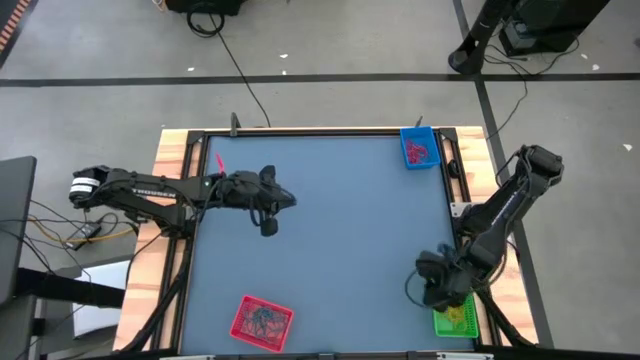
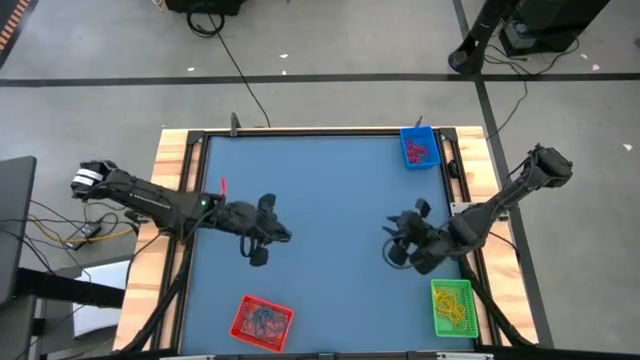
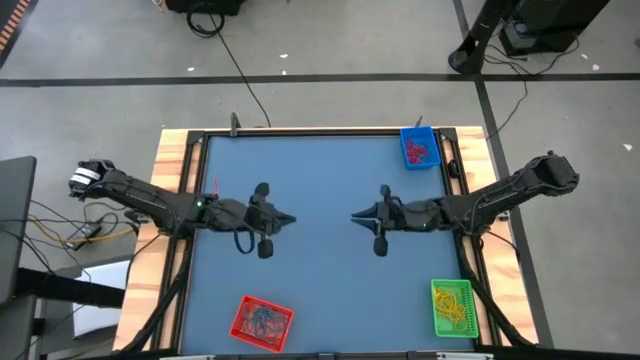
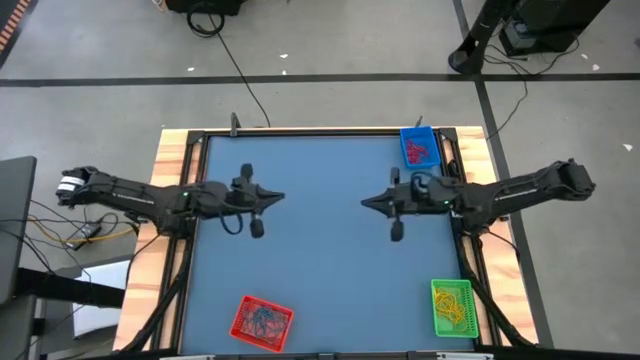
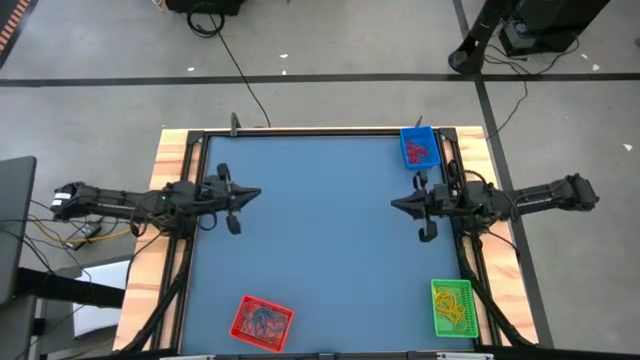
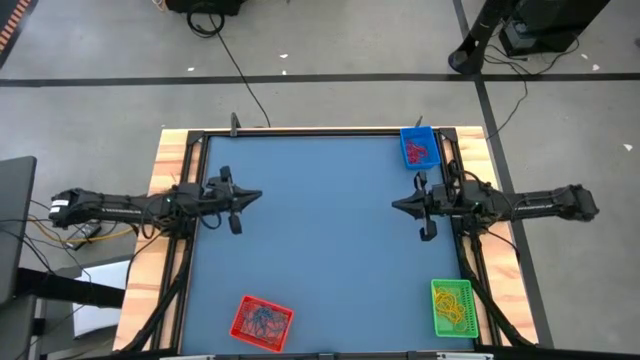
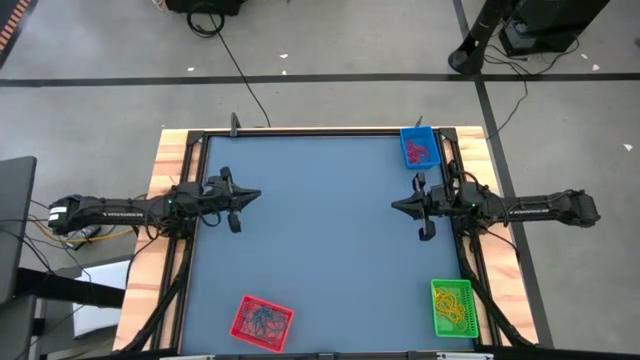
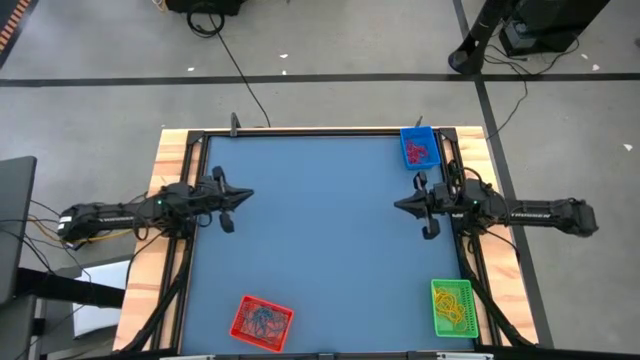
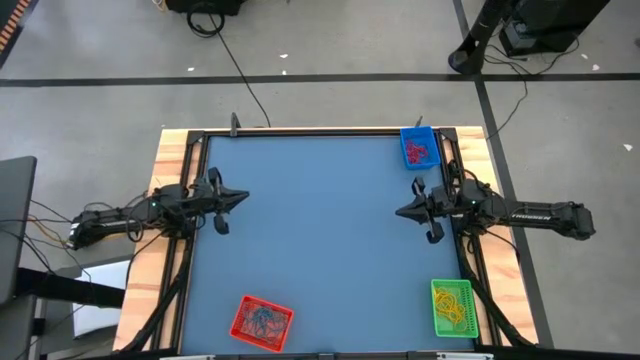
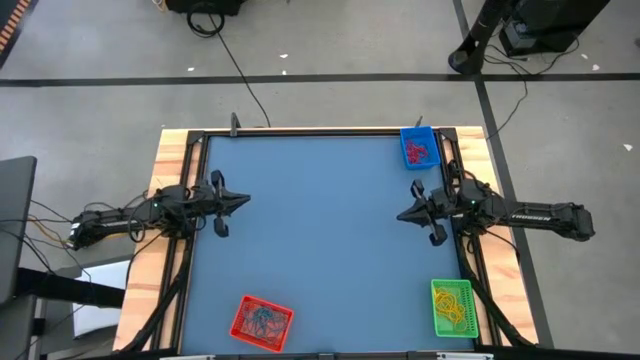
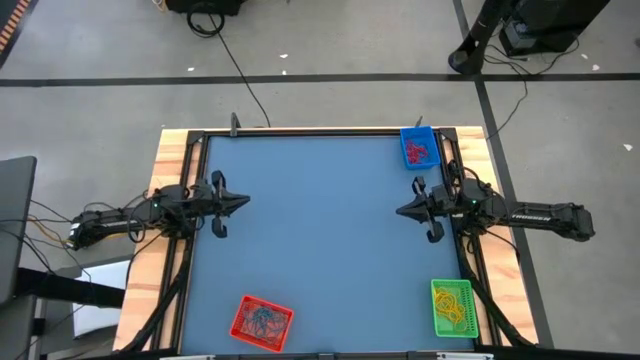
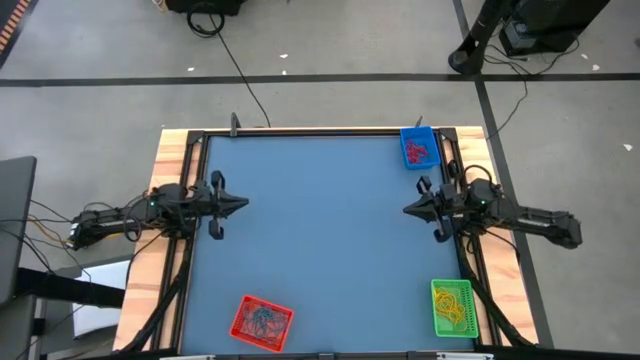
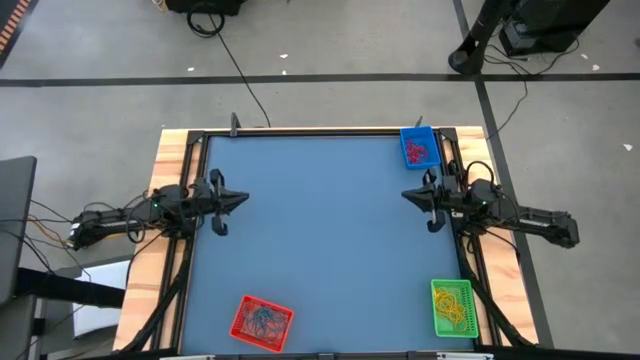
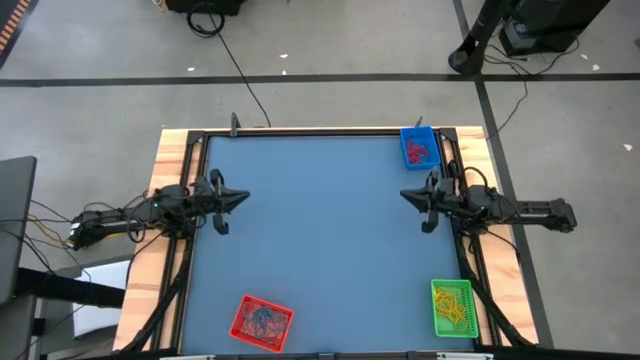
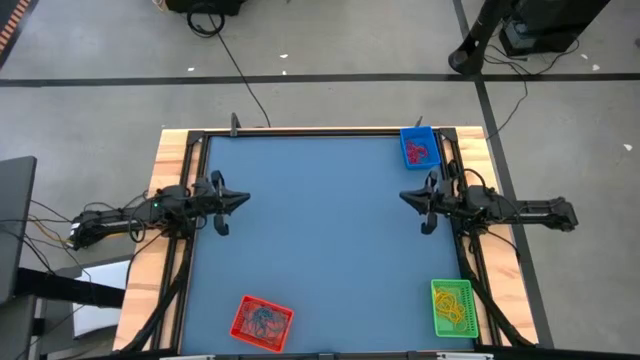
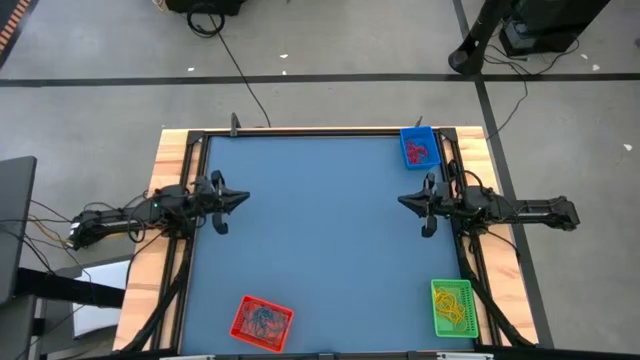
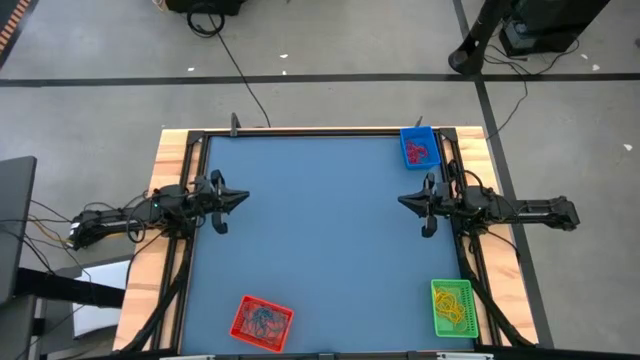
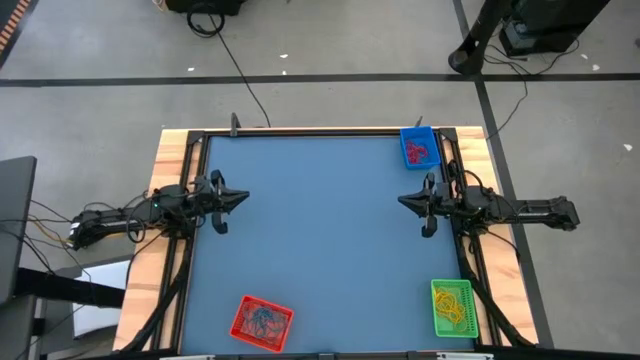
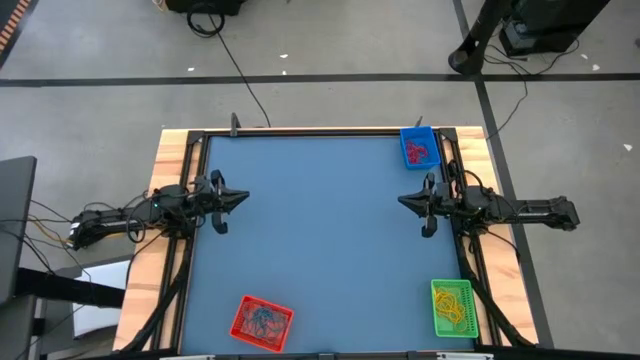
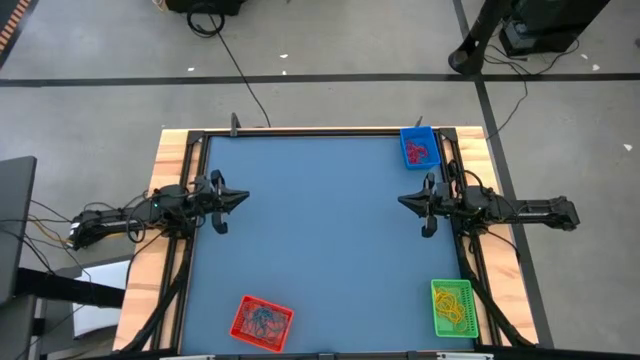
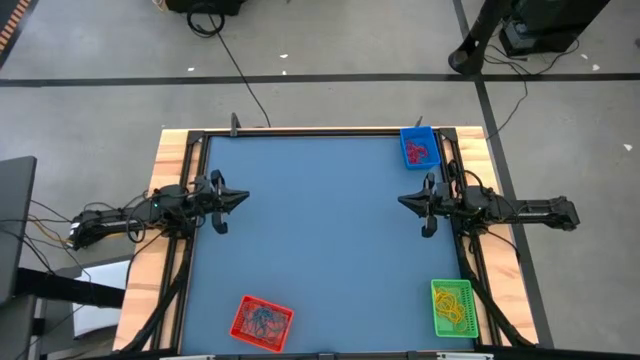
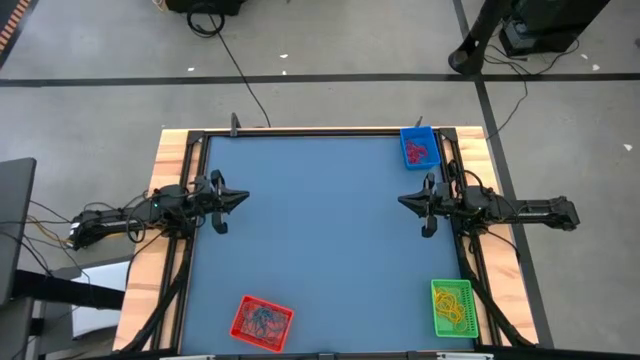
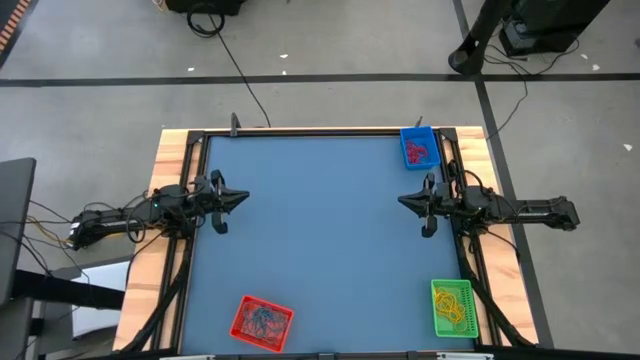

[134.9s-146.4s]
Task: Sort rubber bands into baskets
Return to Home Position

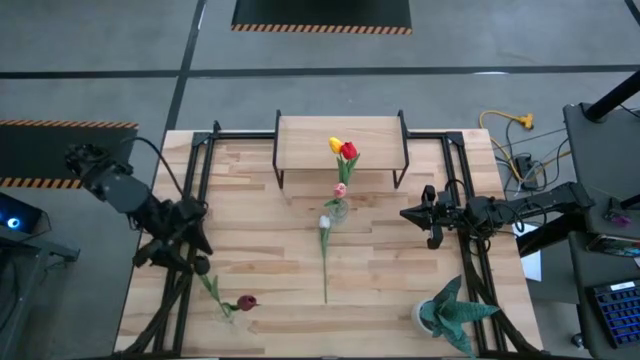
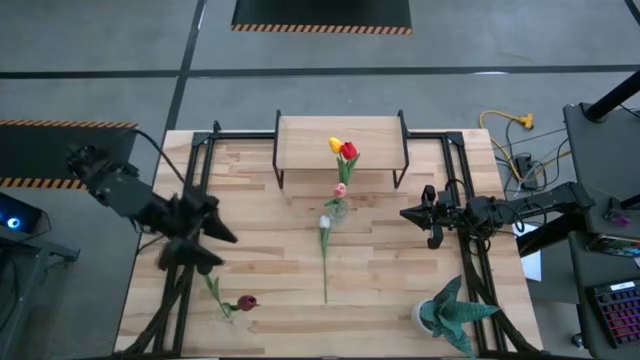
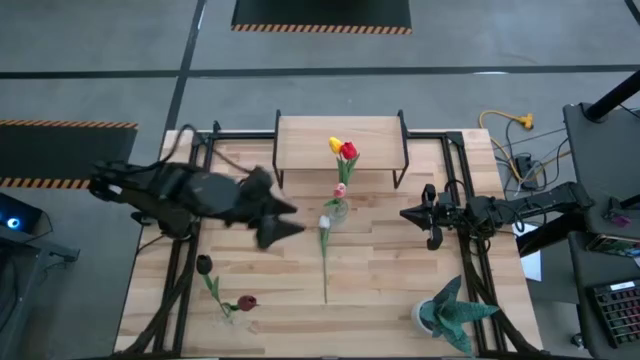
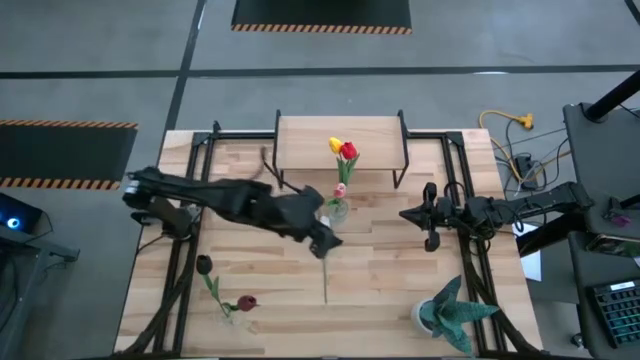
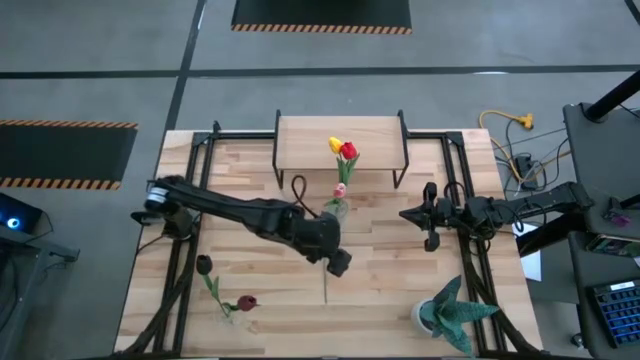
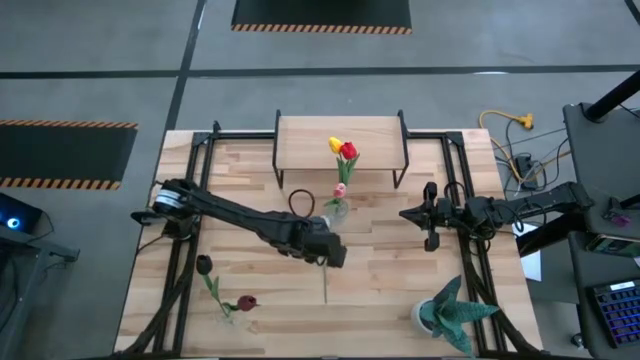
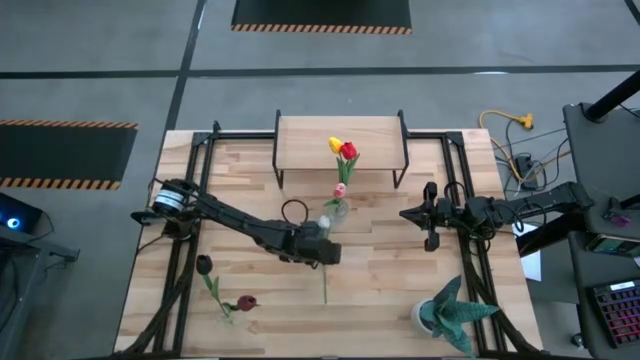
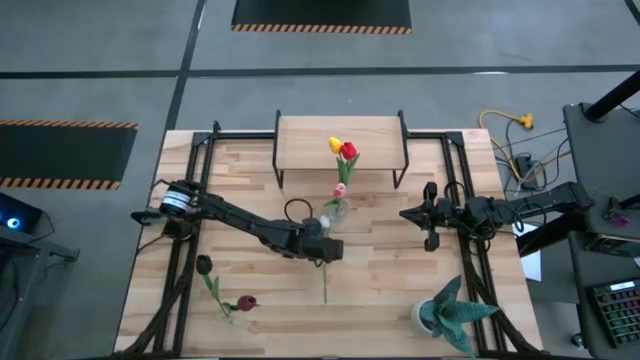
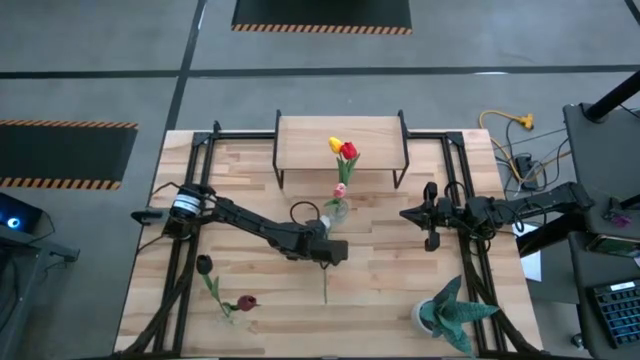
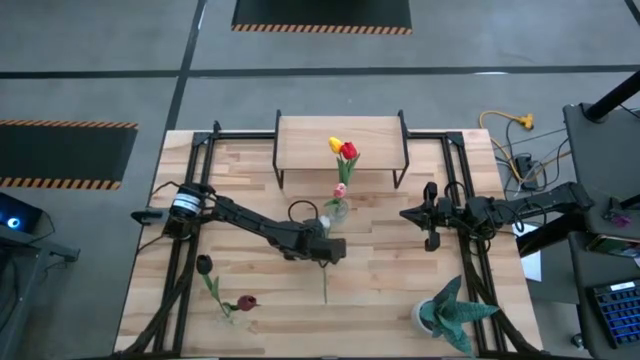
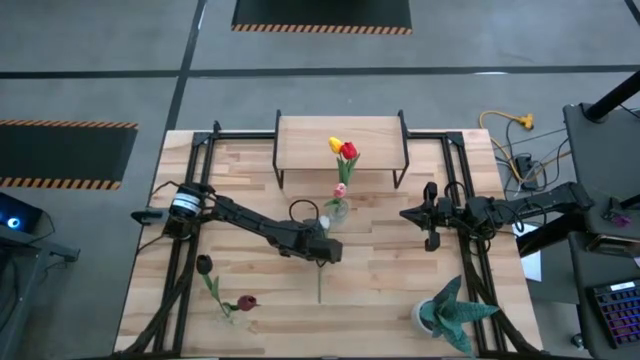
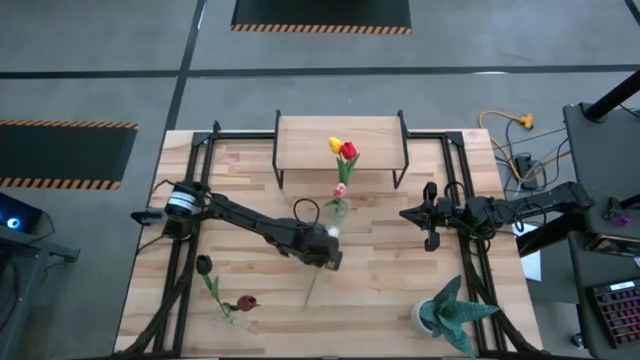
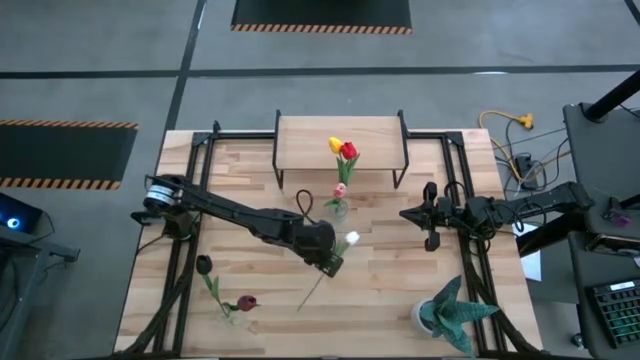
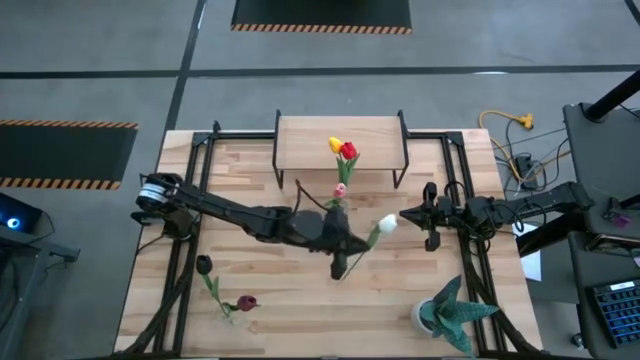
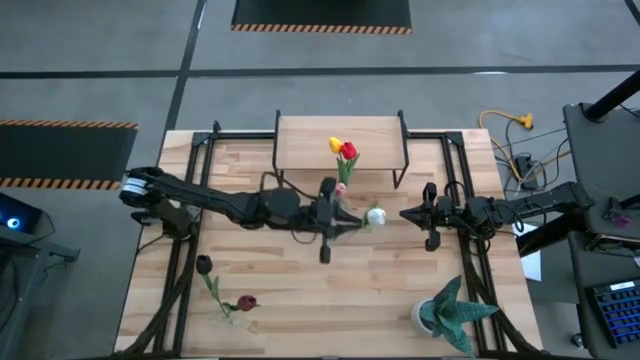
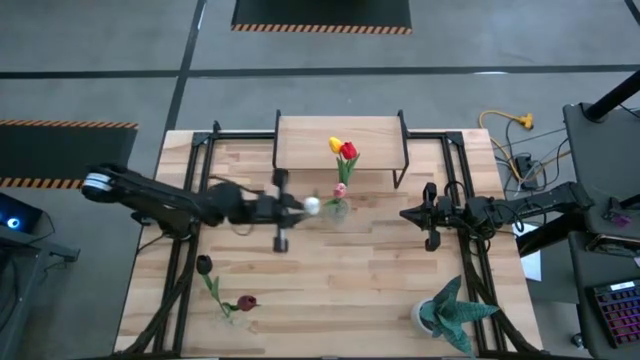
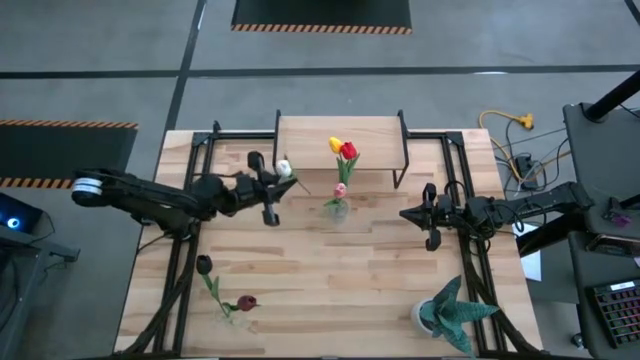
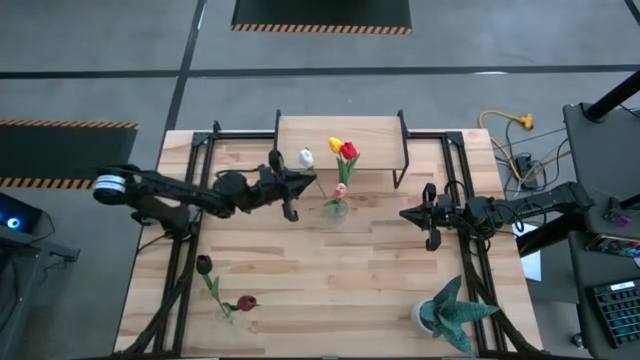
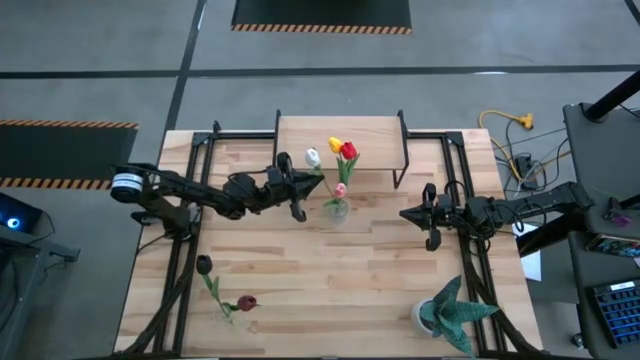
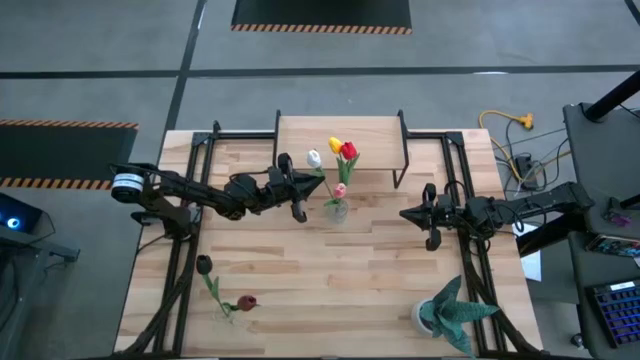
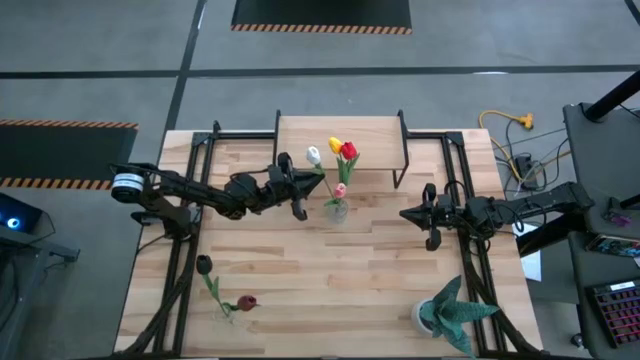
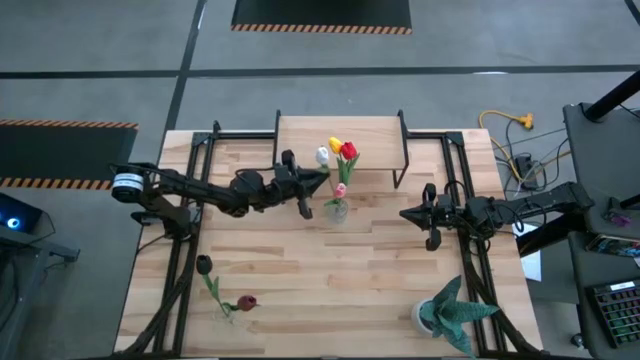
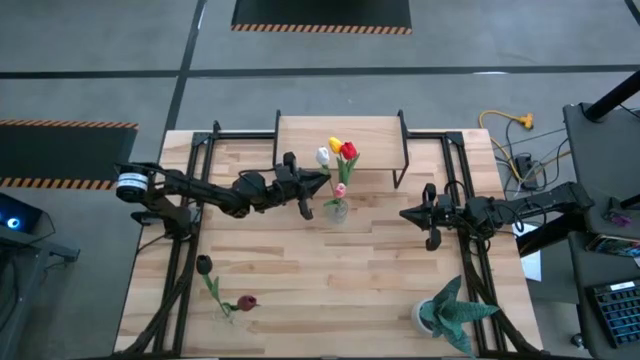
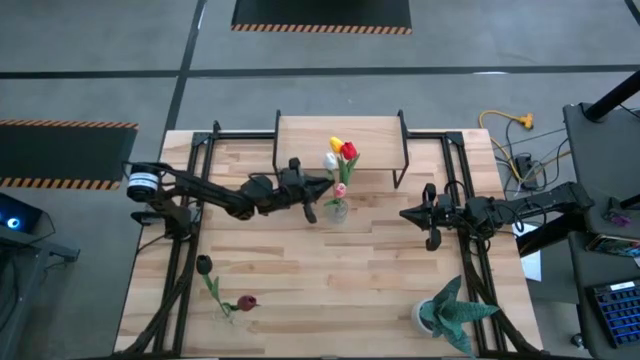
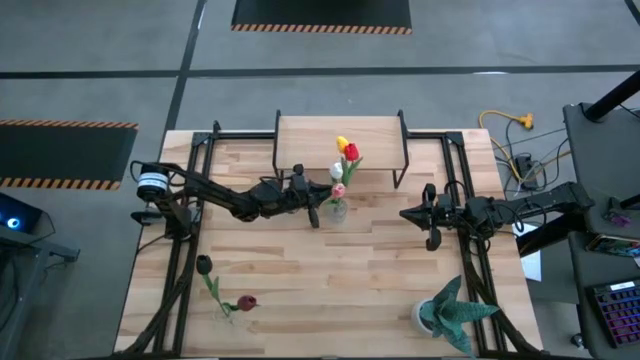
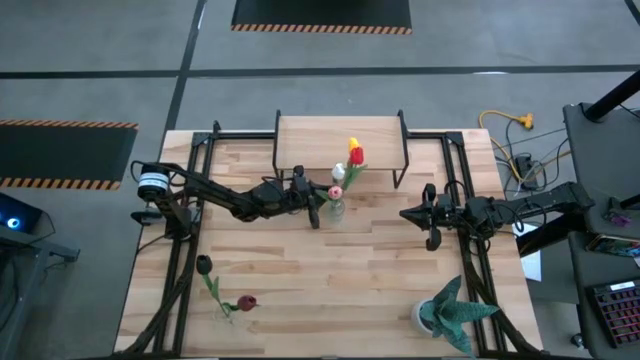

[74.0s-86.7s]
Task: Pick and place flowers into a vace then onto a shelf
Put the black tulip into the bottom transparent vase
